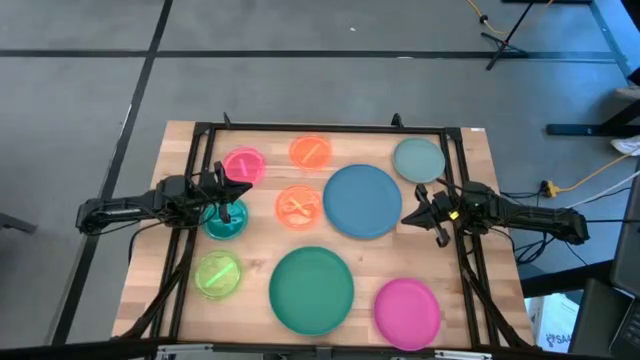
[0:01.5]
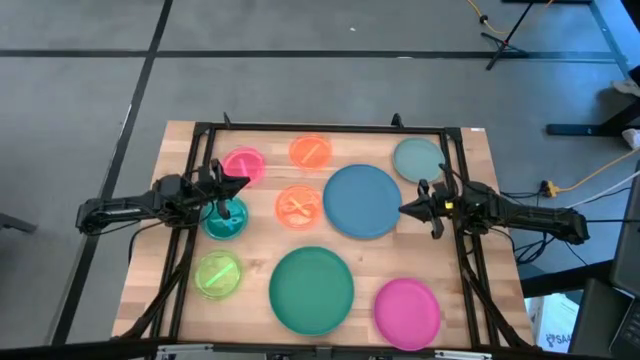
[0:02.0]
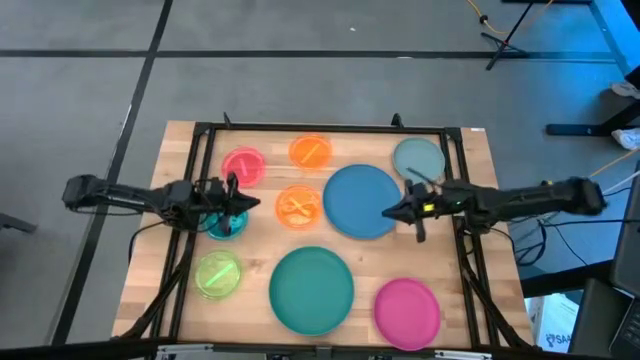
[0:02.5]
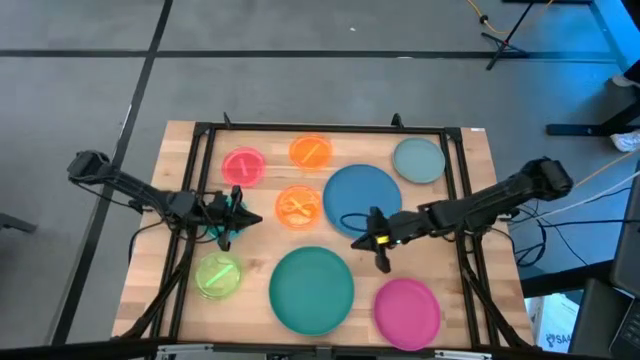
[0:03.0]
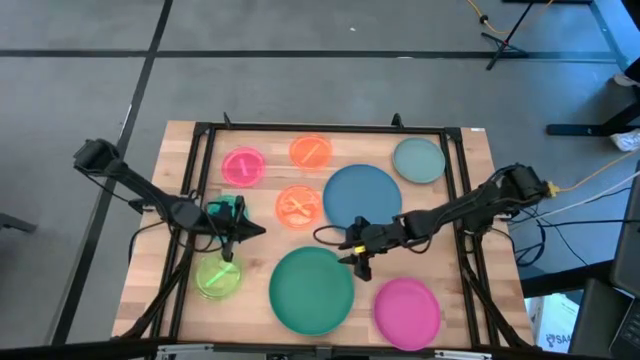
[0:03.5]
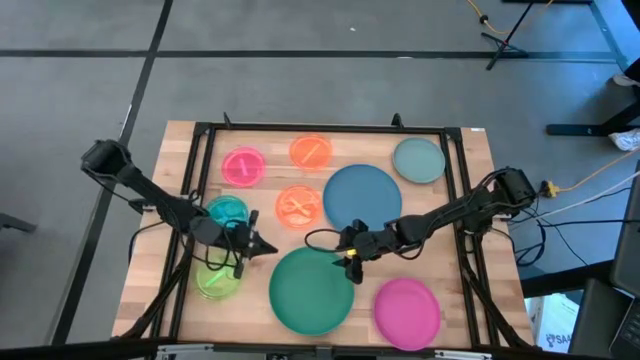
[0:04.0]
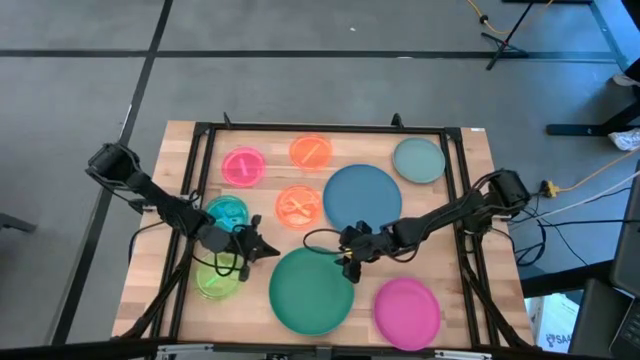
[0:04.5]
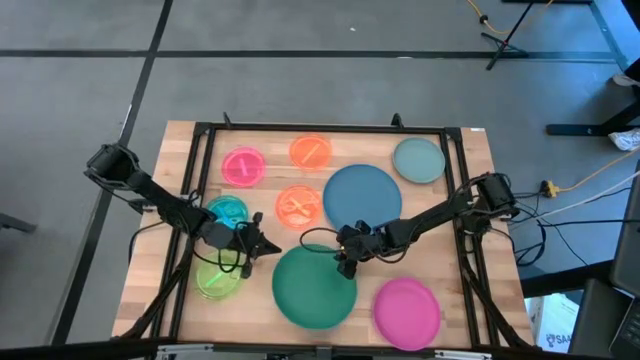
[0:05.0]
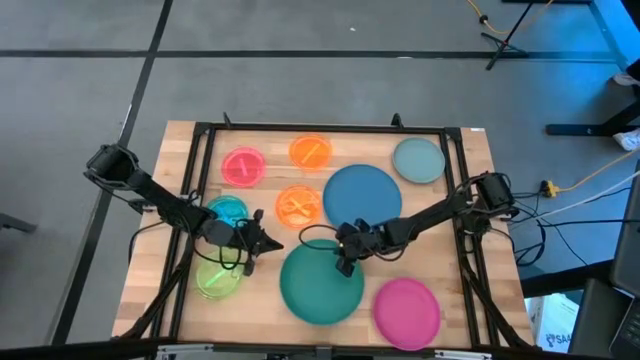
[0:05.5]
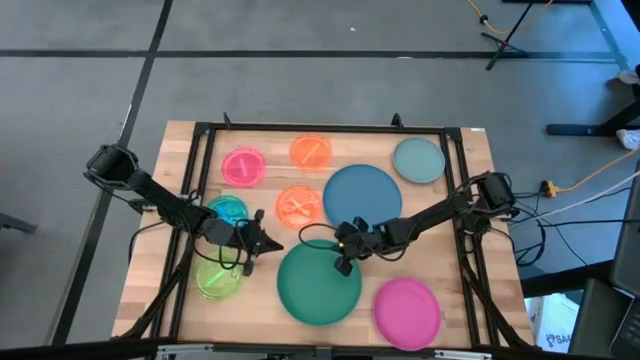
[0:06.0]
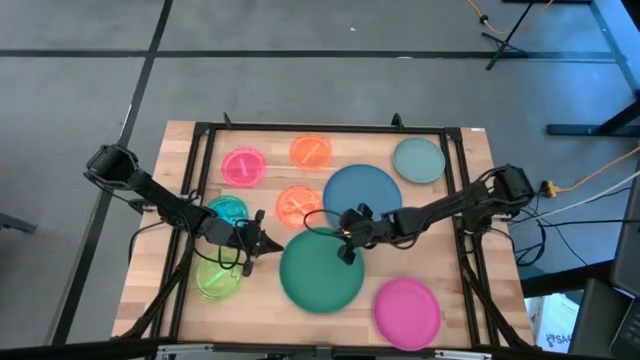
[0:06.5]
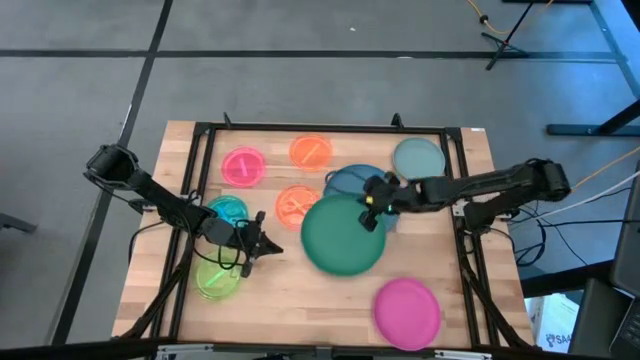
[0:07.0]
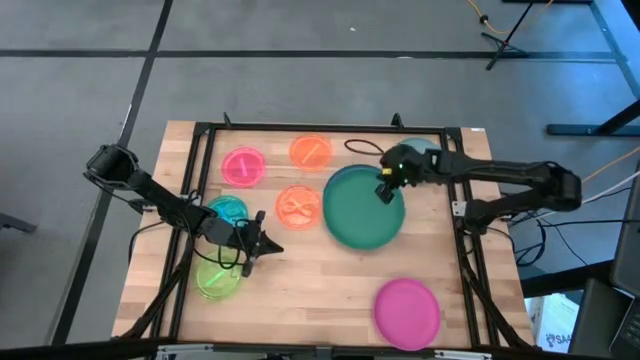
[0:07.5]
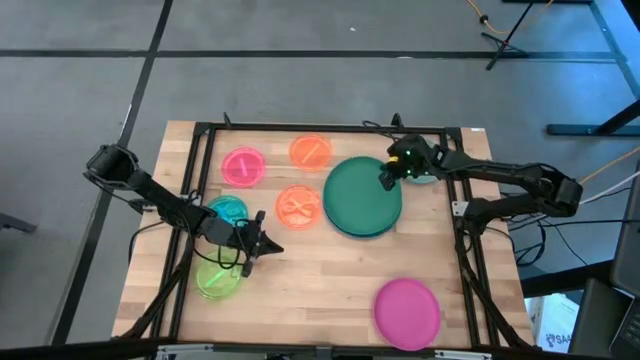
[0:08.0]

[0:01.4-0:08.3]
Task: Stack plastic plates
Stack the green plate on top of the blue plate

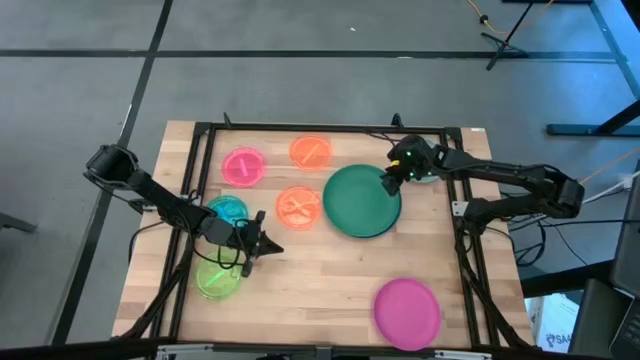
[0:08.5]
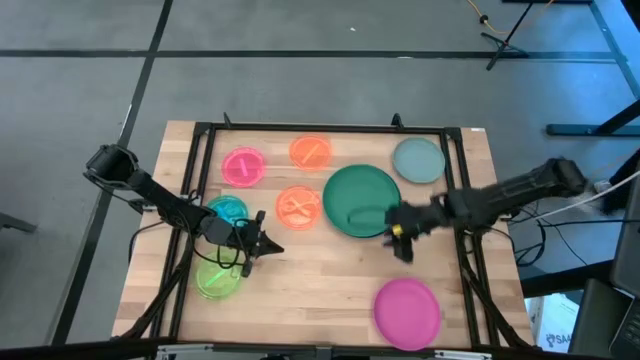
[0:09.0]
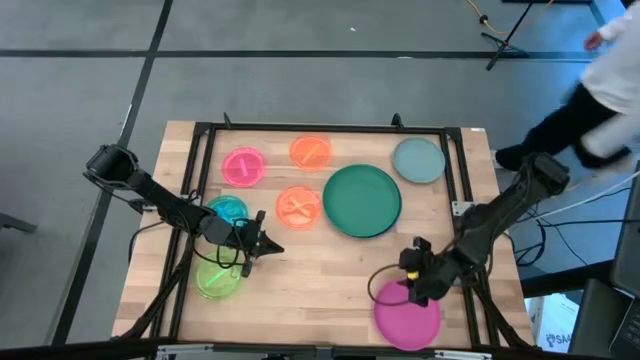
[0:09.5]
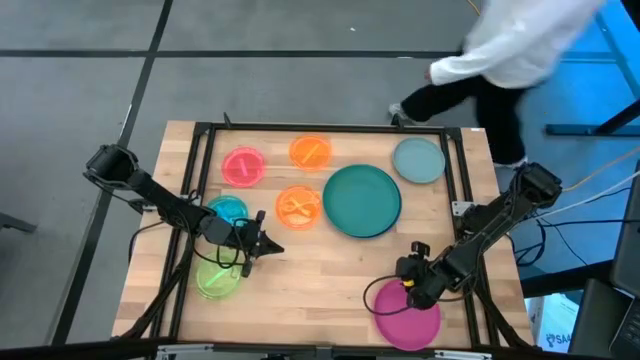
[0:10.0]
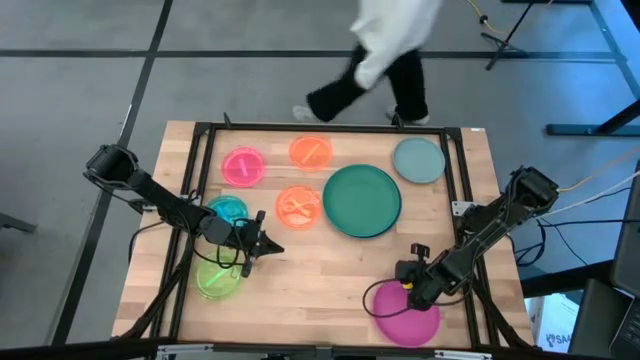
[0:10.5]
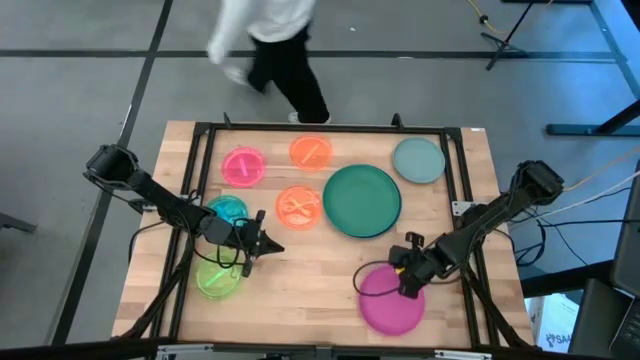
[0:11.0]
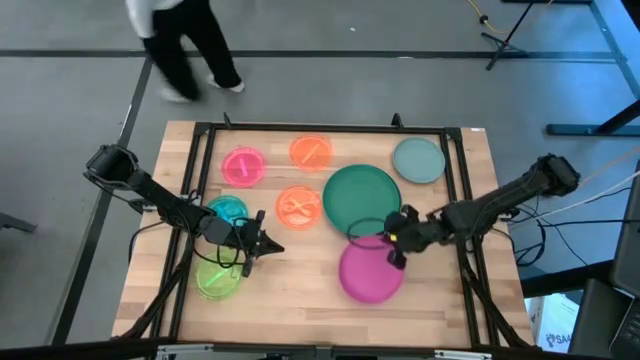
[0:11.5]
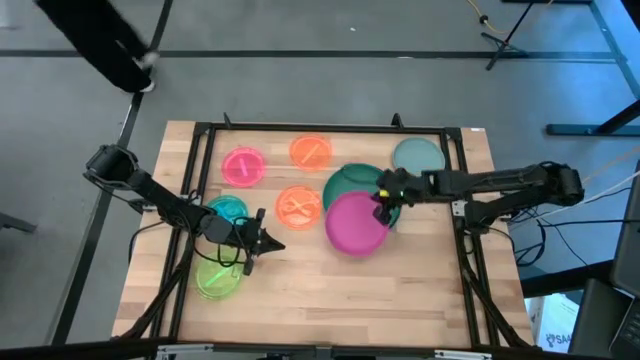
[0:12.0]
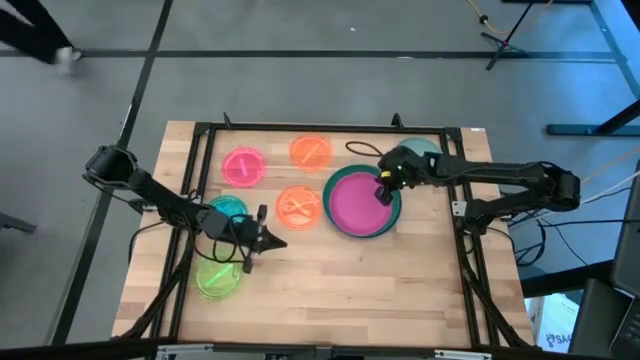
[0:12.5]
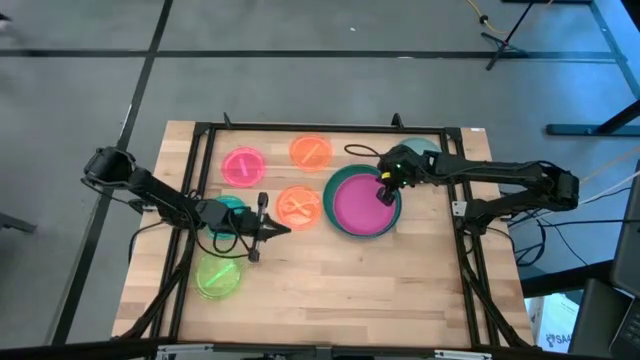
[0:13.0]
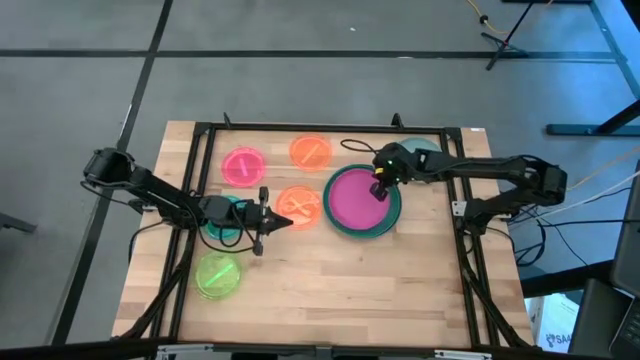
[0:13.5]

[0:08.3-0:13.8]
Stack the pink plate on top of the green plate

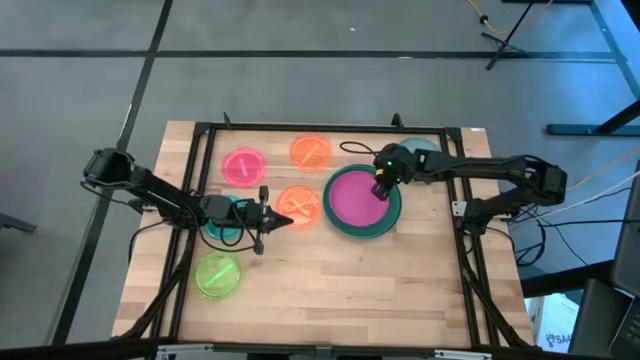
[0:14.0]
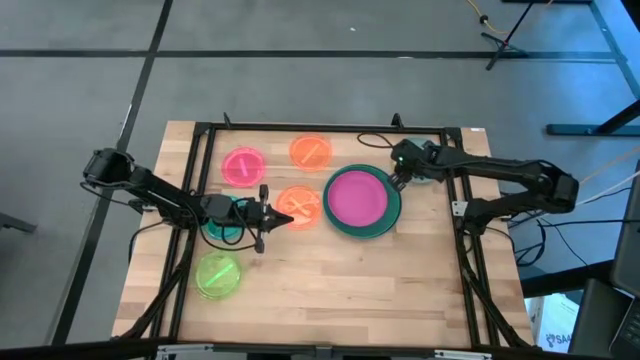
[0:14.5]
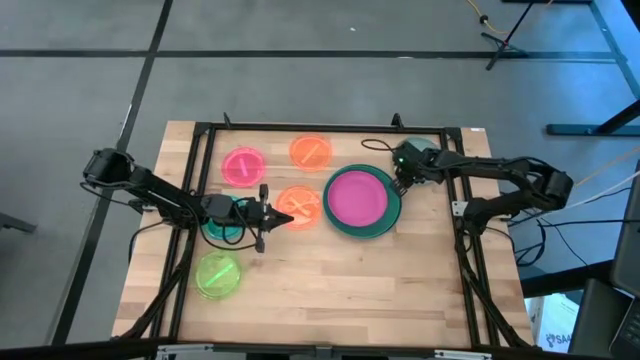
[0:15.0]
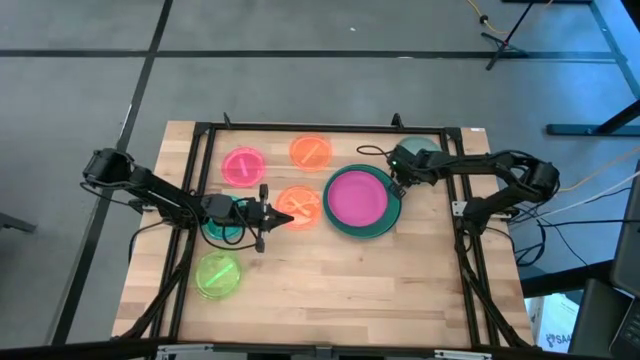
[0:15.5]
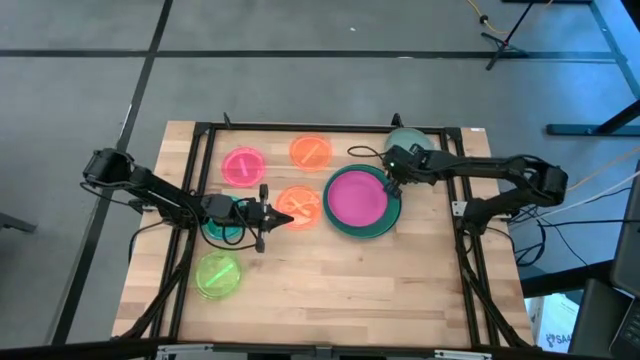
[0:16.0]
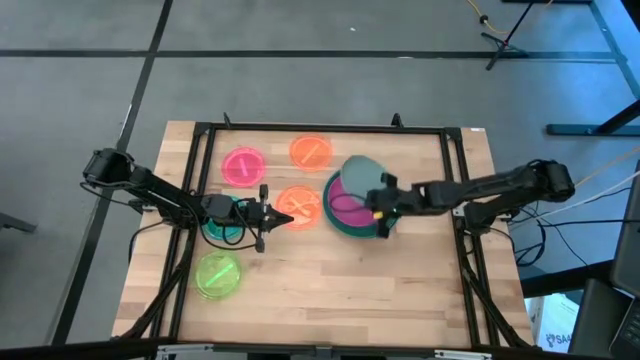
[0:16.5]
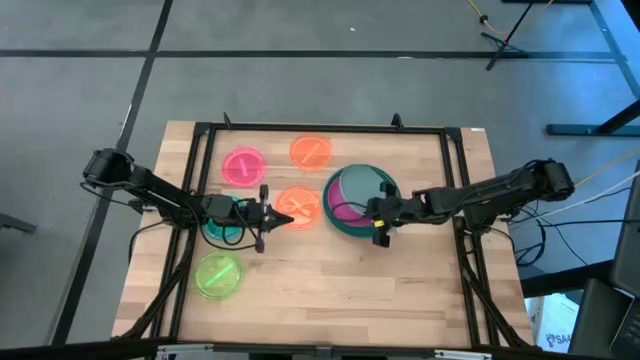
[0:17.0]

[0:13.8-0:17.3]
Stack the light blue plate on top of the pink plate

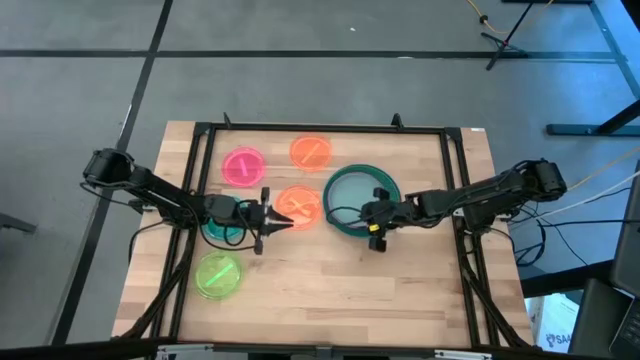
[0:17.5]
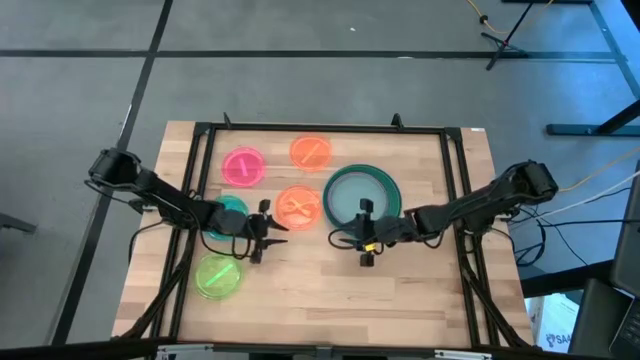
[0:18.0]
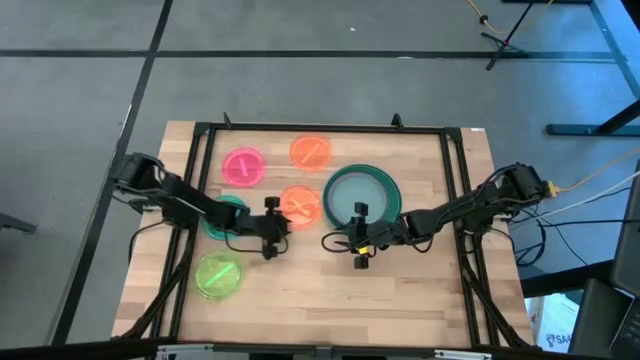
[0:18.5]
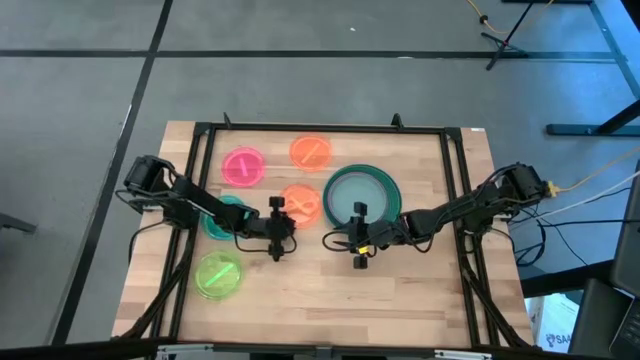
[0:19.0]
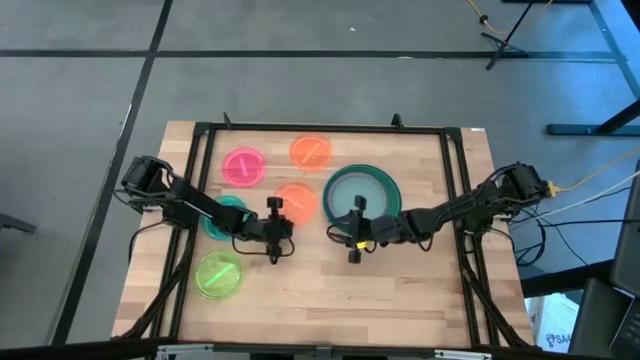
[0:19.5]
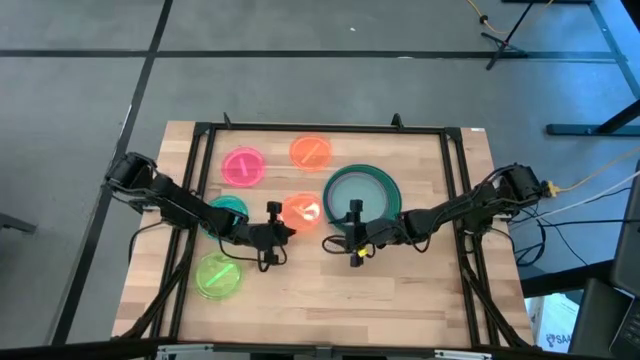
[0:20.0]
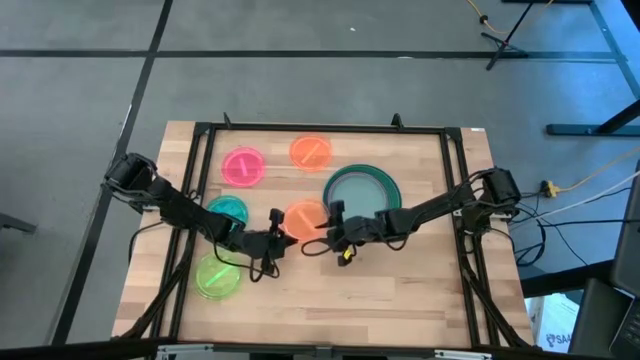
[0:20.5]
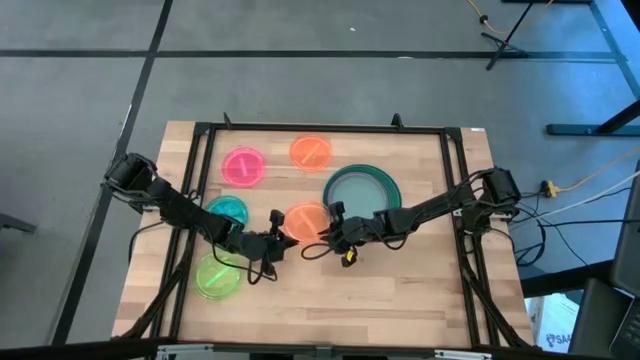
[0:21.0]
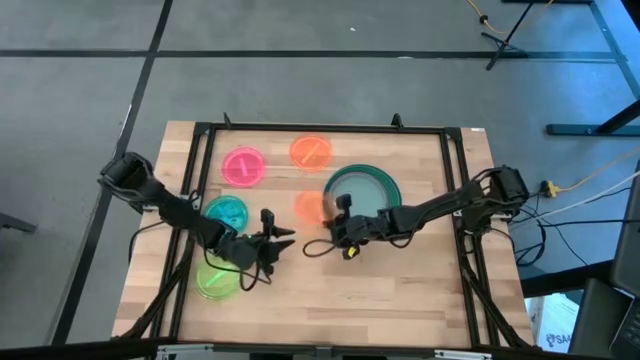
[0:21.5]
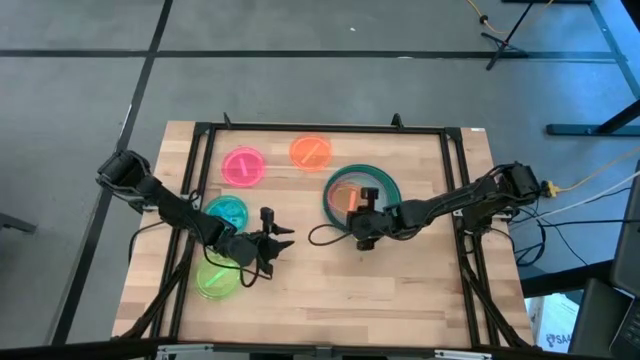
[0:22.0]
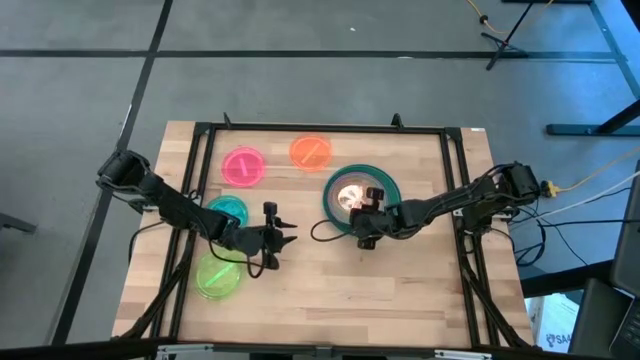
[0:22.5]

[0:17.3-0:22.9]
Stack the bottom orange plate on top of the light blue plate

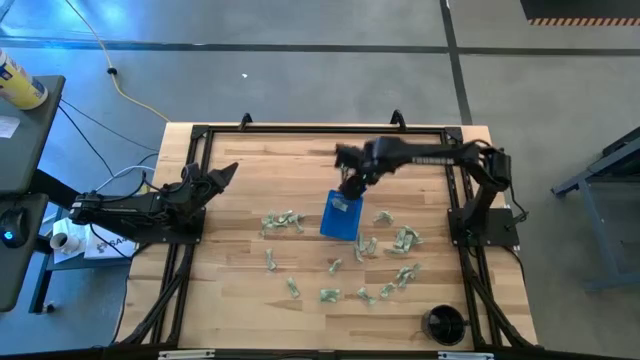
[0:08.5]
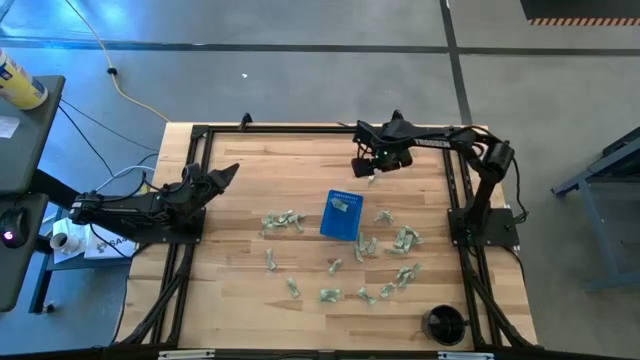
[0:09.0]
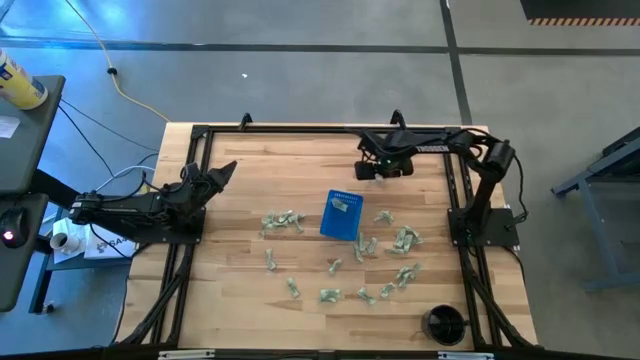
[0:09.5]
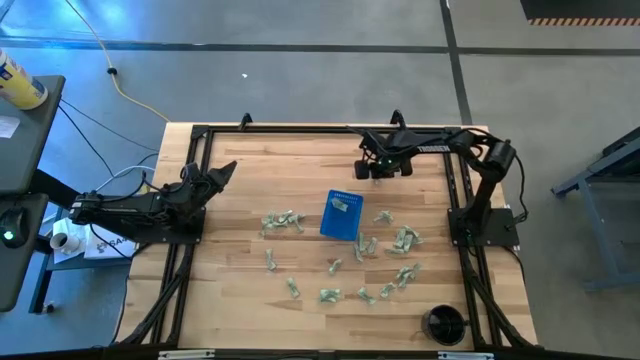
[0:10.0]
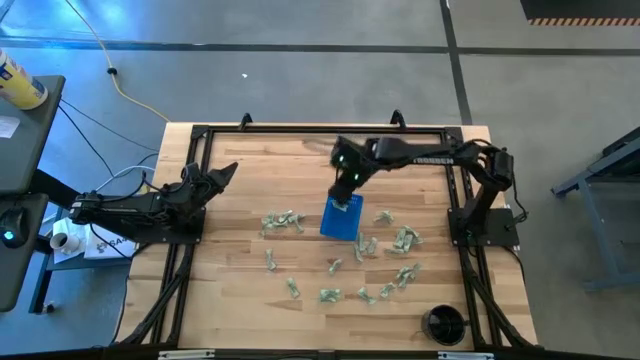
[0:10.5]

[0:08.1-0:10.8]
Task: Pick and place Stevia / Truvia into bins
Put the stevia packet into the blue basket
